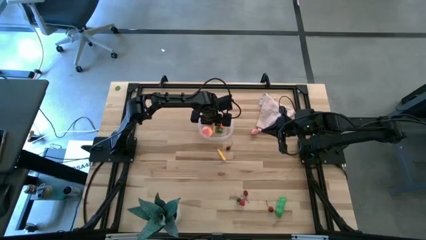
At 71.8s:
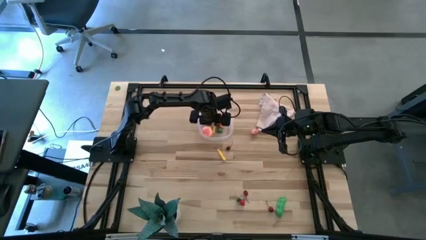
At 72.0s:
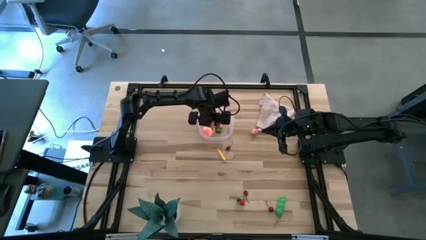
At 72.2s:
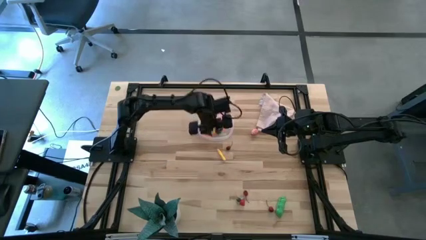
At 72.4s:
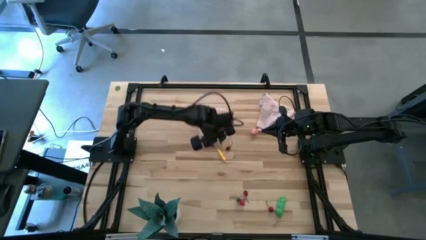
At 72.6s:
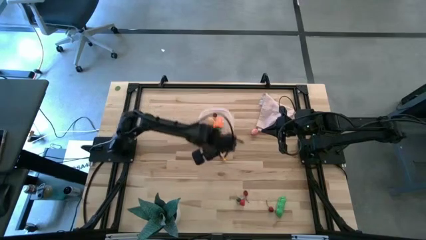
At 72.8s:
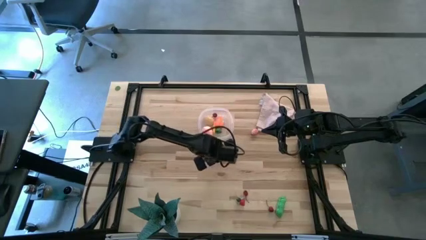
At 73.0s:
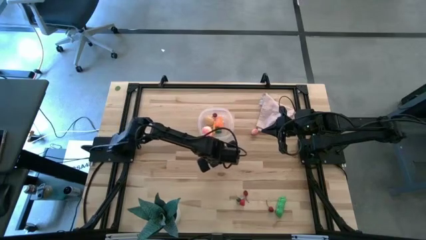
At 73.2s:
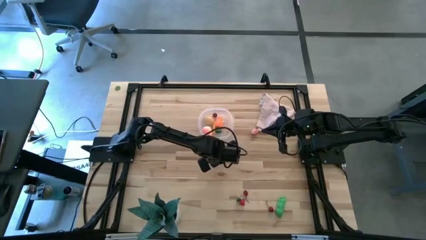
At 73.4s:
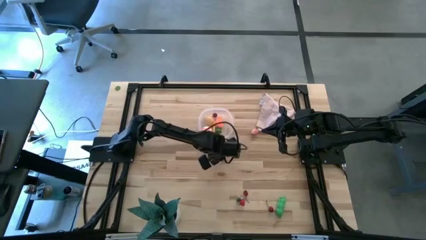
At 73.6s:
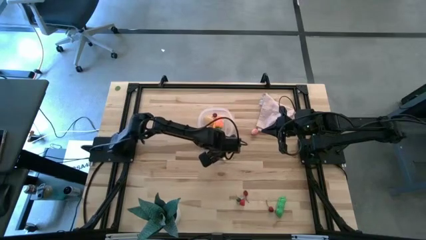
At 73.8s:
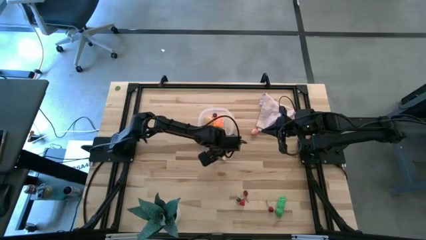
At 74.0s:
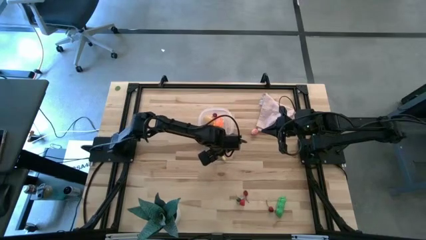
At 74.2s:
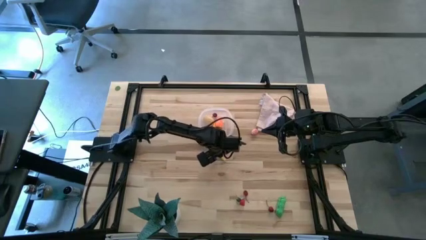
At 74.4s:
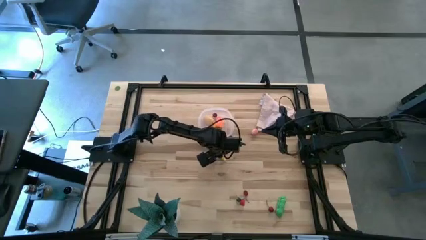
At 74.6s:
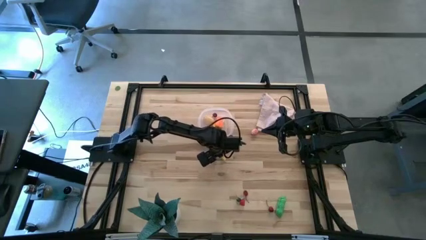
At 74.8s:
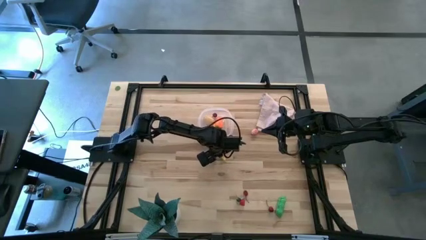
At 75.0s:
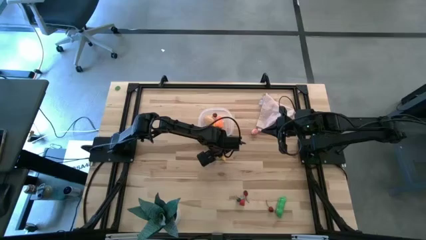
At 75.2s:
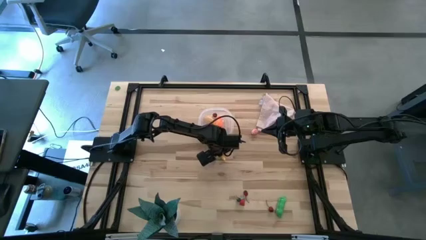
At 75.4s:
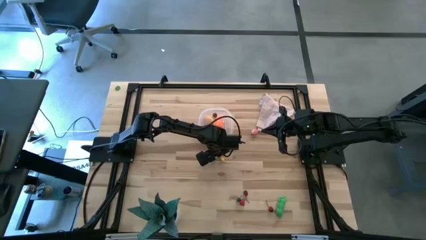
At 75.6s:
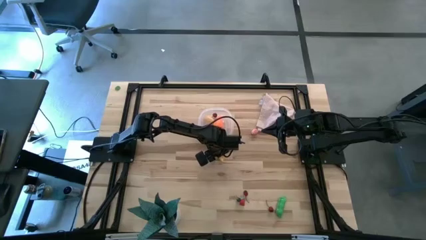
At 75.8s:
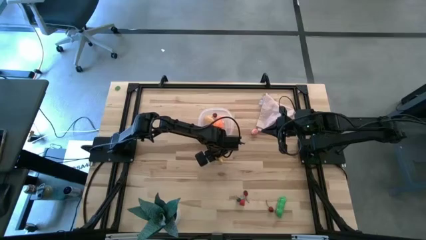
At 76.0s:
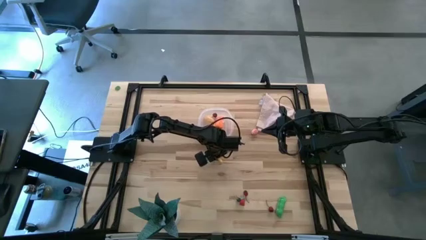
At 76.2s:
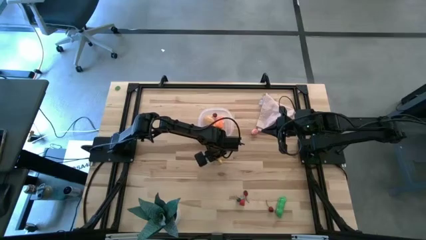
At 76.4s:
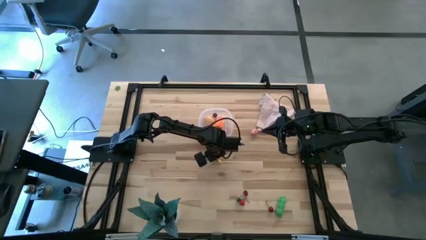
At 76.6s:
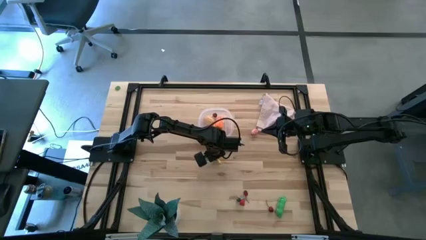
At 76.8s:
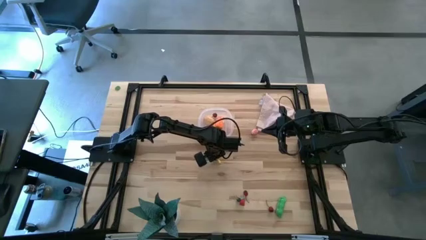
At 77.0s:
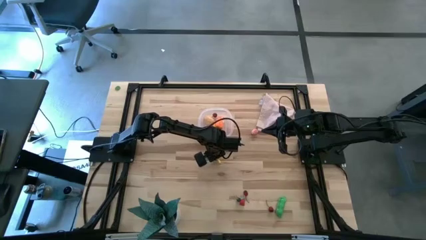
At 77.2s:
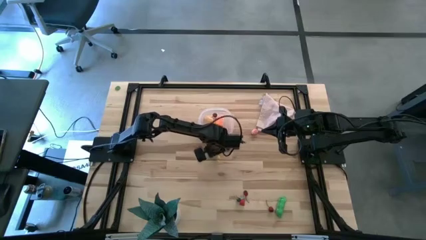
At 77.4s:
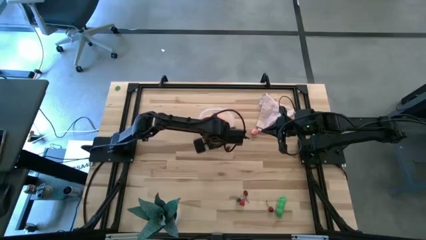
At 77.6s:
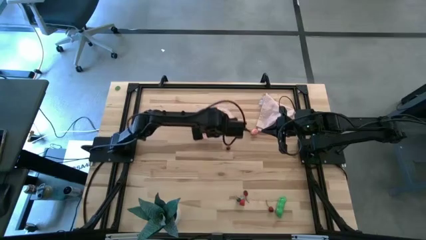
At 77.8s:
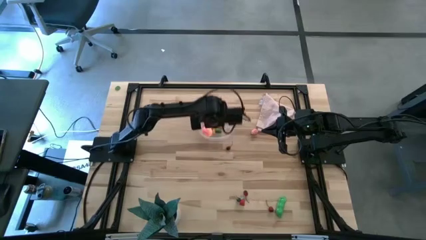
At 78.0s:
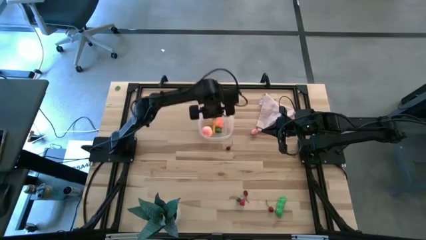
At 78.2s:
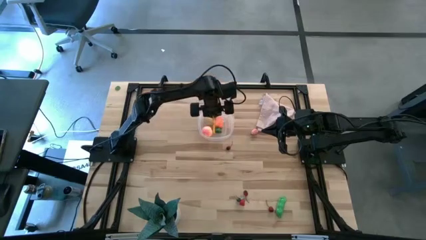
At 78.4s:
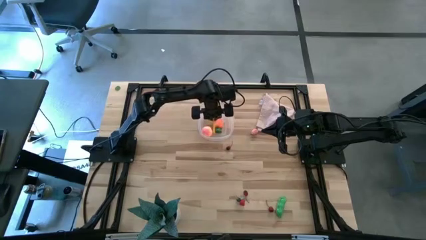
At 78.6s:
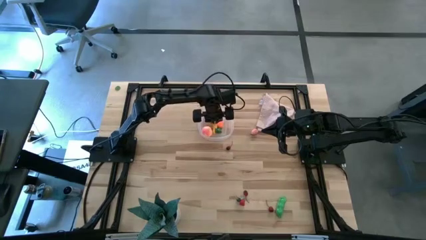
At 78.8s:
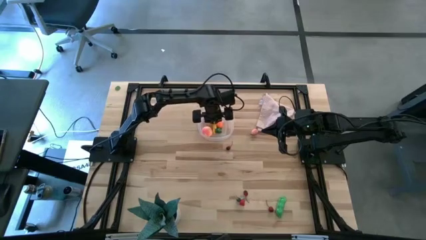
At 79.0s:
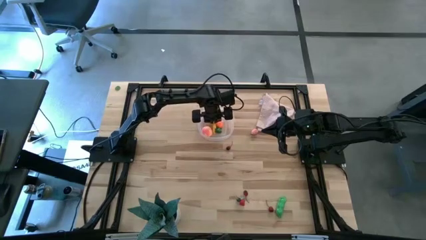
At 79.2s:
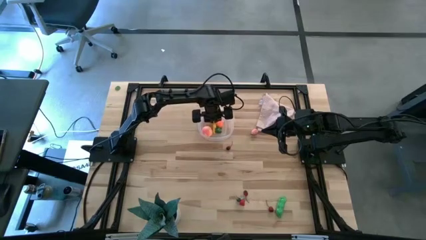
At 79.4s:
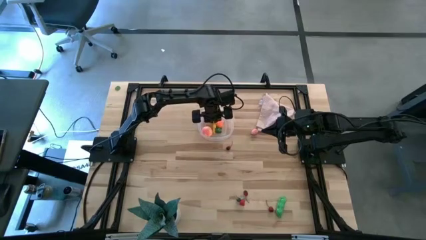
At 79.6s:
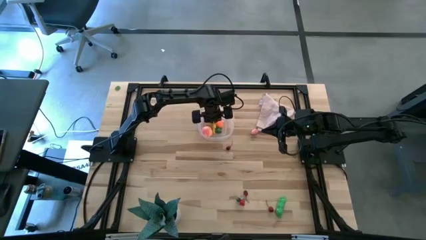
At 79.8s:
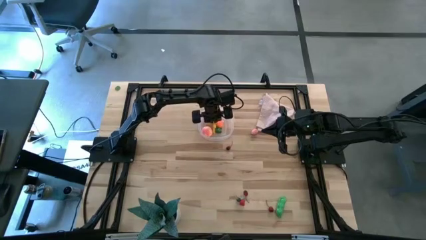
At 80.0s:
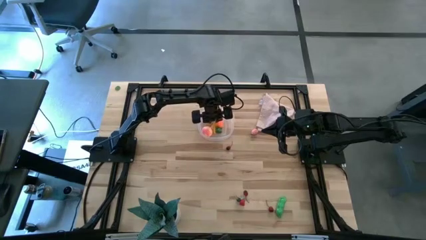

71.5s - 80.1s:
Task: Pick and placing Produce into tupperware
Put the yellow corn into the transparent bin

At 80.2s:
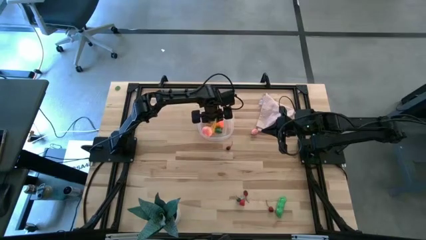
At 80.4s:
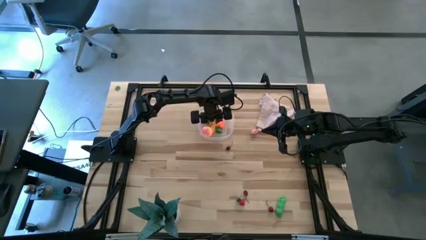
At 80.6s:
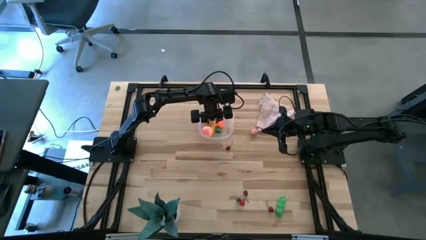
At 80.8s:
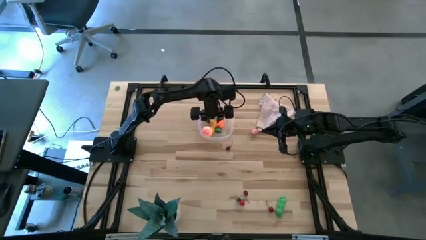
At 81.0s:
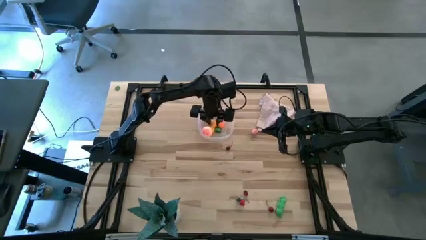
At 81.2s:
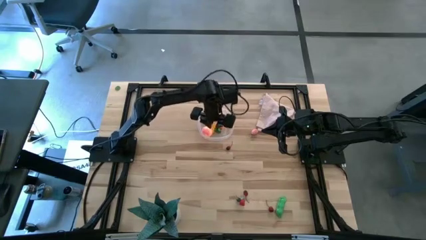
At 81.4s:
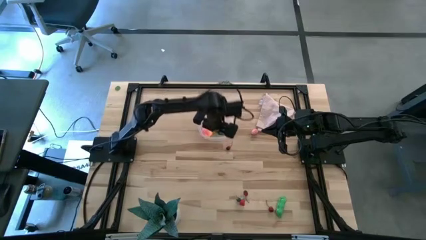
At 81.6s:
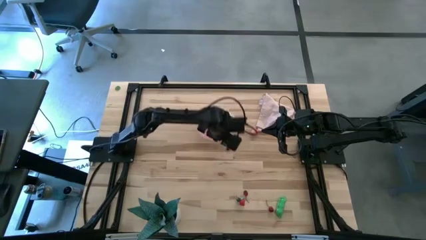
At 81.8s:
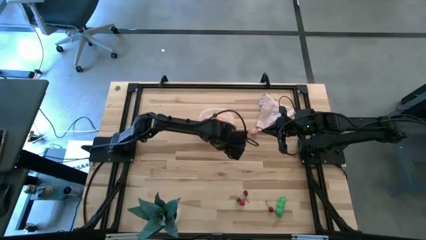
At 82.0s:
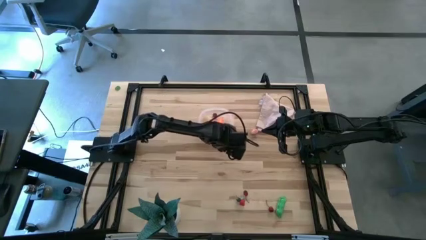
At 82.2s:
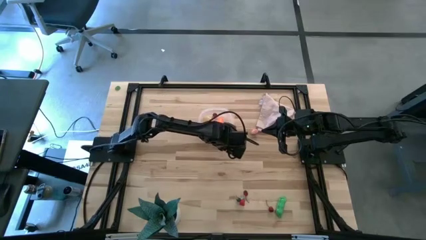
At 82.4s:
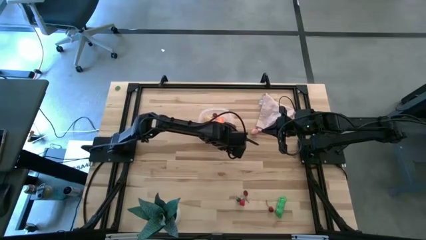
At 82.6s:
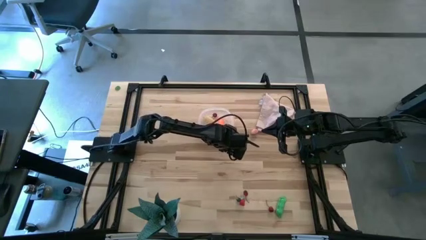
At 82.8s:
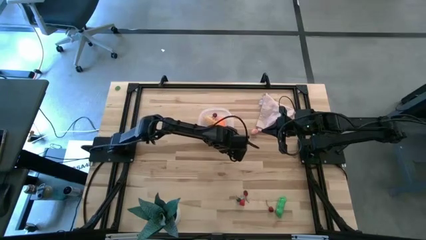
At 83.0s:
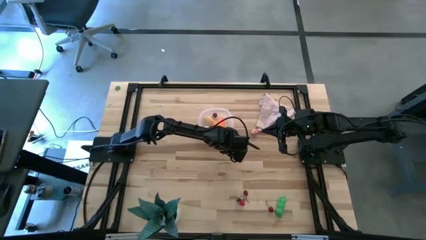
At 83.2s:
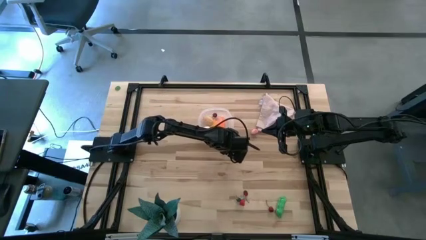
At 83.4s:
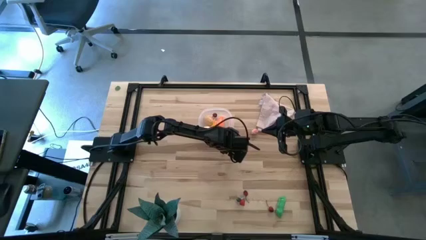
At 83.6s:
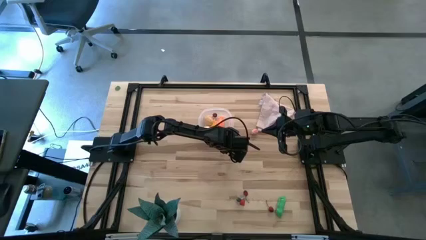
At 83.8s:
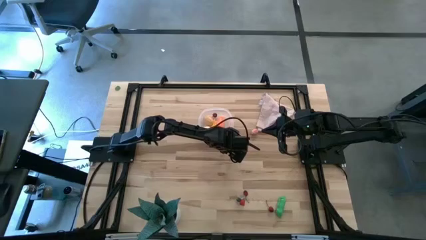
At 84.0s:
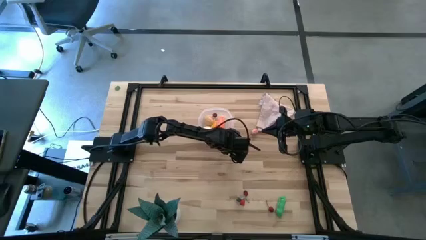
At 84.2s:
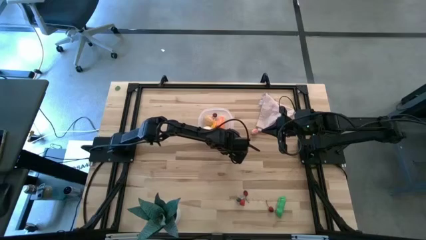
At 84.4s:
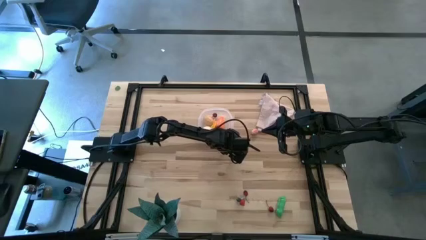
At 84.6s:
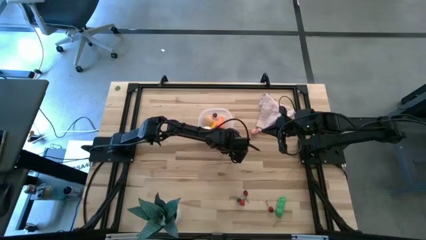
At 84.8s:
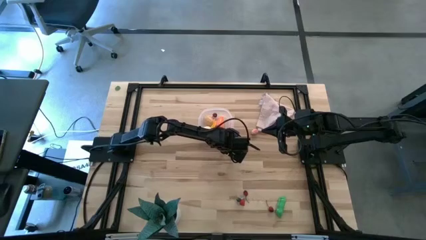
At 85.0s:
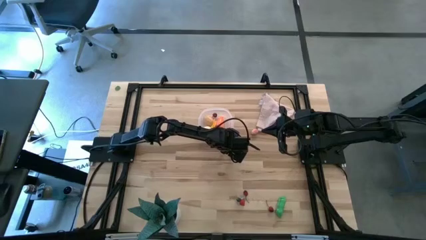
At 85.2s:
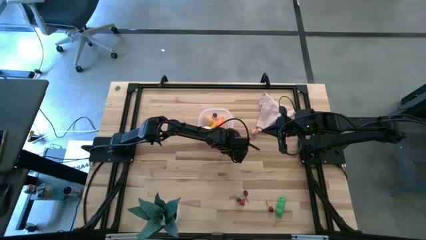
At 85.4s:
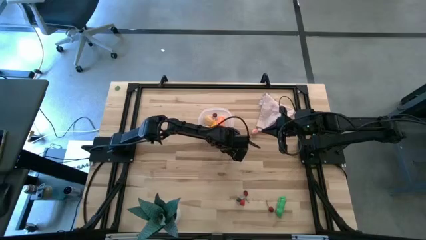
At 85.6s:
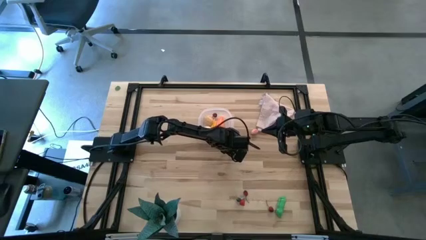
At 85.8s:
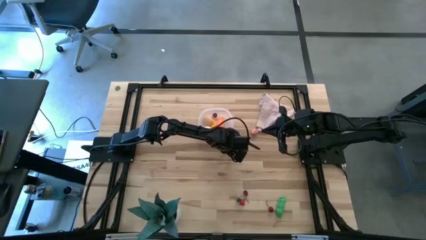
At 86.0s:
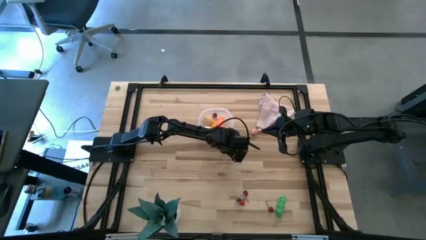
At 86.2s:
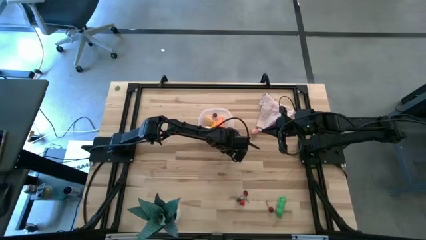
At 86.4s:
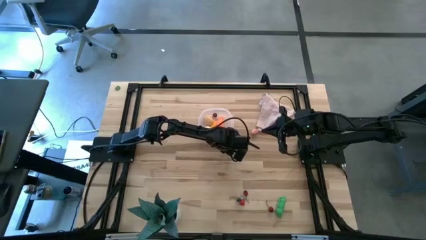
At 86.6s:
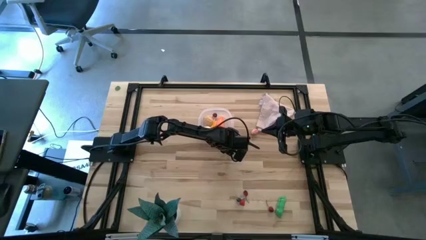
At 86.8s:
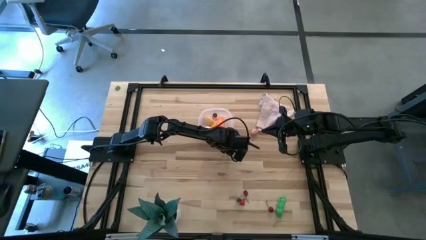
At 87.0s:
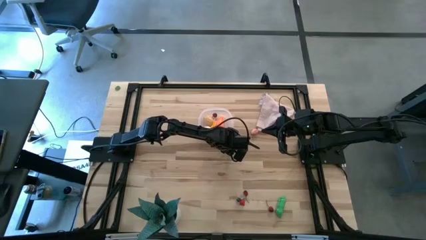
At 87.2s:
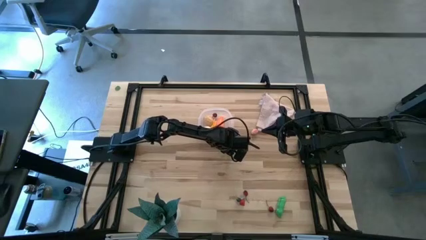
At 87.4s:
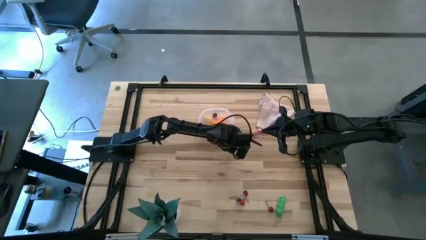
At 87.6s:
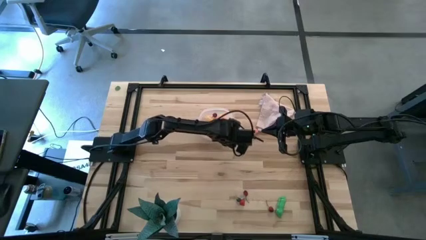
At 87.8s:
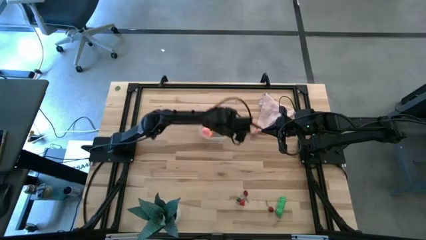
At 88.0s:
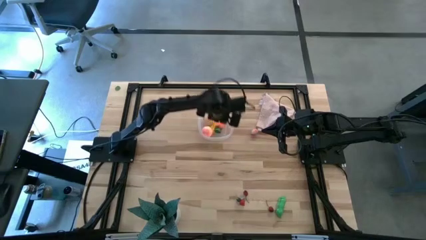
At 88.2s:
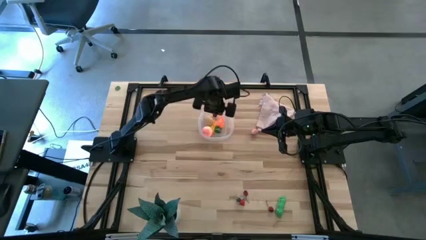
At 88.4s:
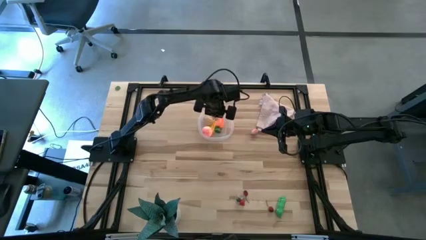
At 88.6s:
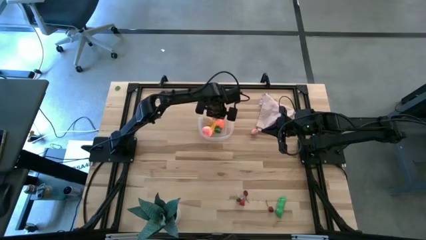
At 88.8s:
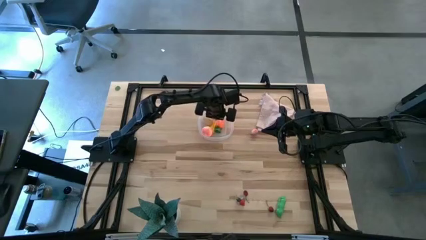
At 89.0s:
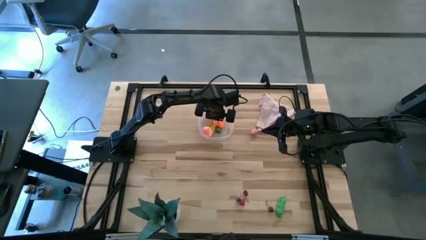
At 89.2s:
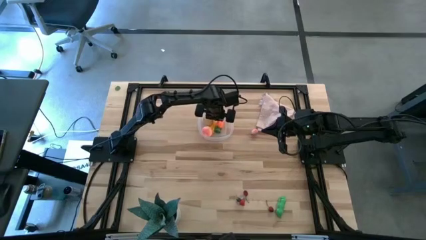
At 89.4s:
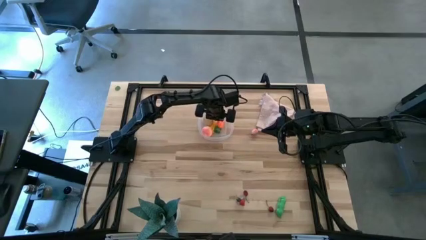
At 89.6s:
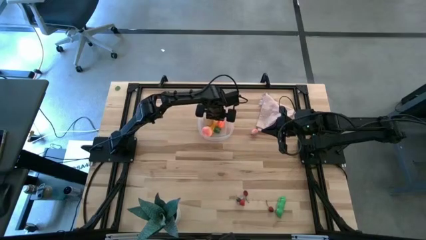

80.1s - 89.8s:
Put the red cherry into the transparent bin
